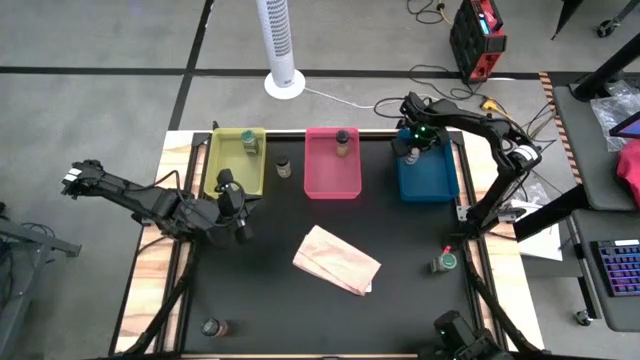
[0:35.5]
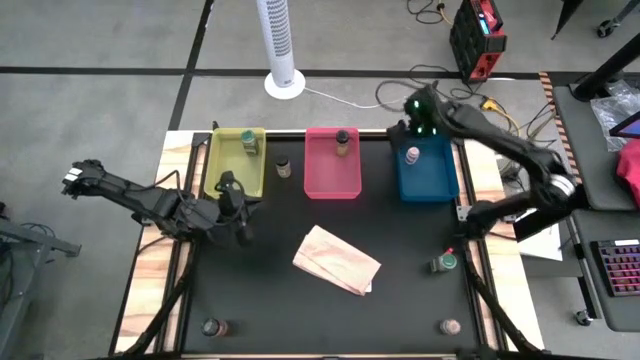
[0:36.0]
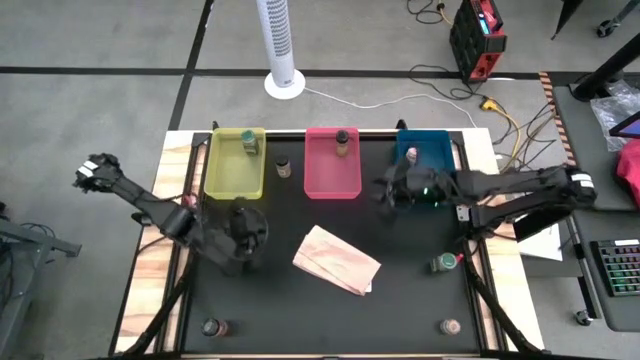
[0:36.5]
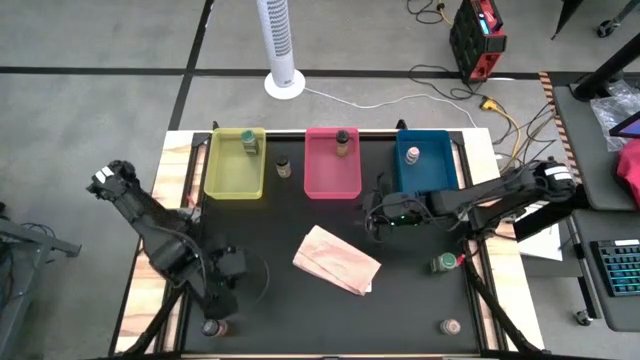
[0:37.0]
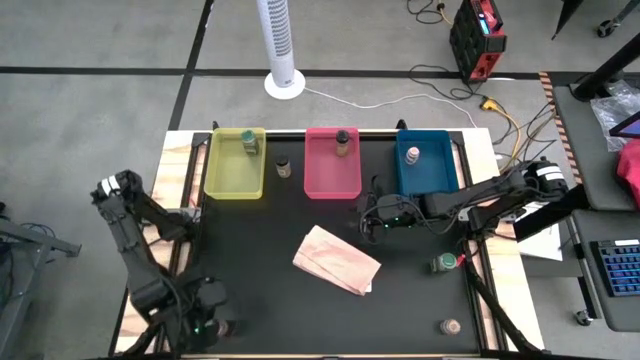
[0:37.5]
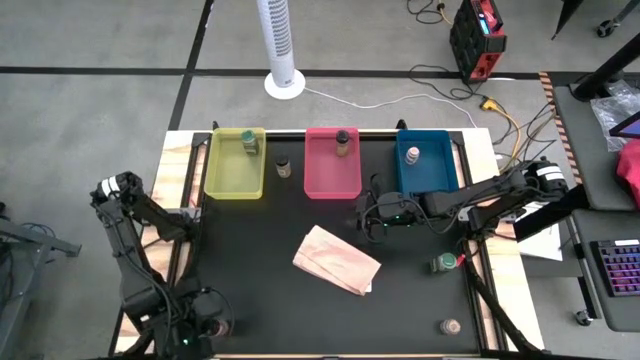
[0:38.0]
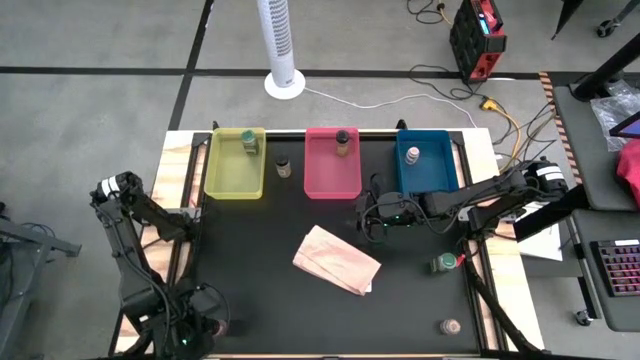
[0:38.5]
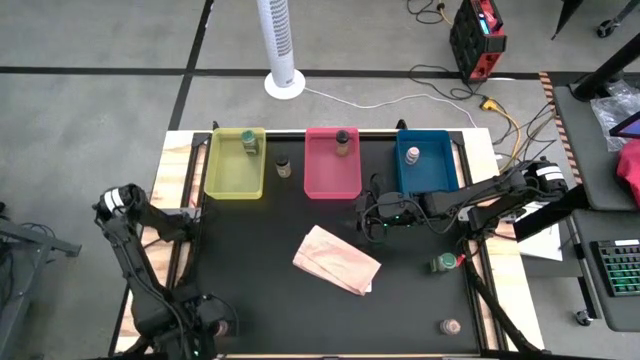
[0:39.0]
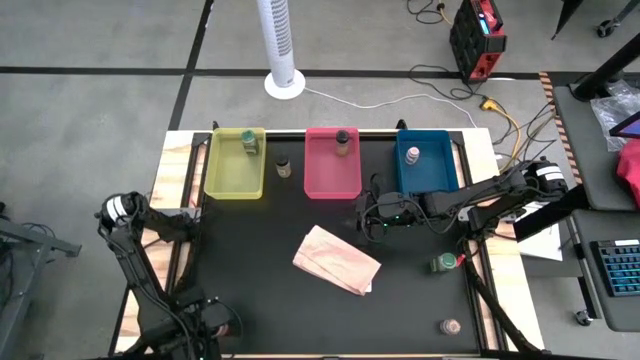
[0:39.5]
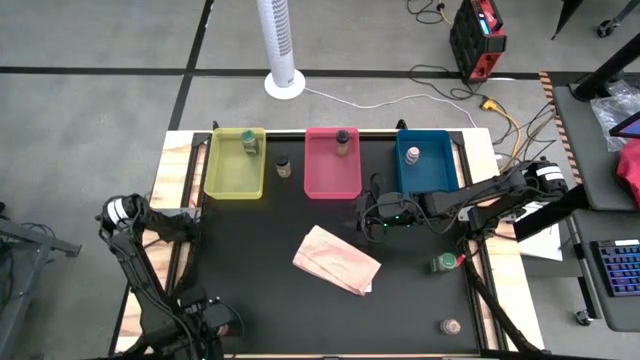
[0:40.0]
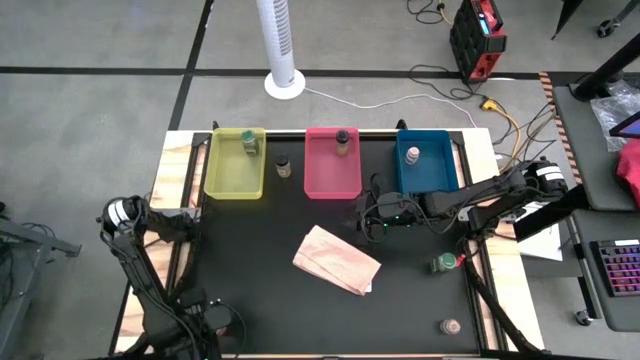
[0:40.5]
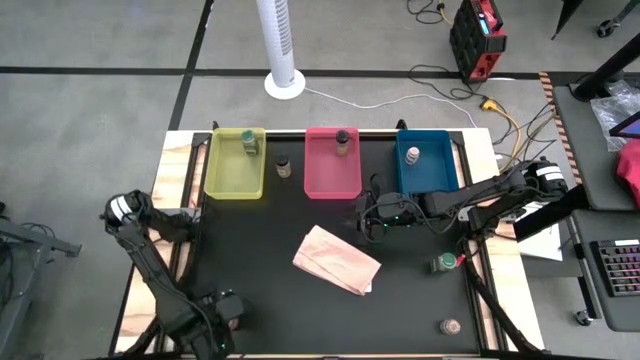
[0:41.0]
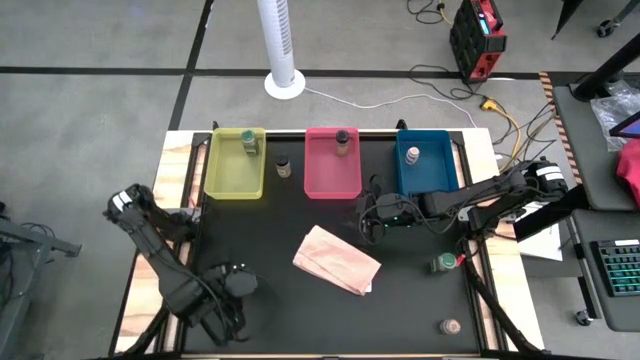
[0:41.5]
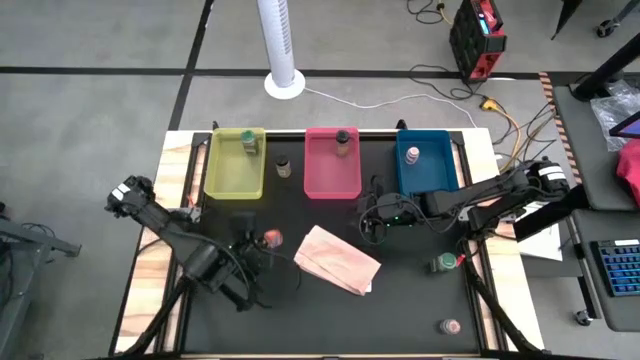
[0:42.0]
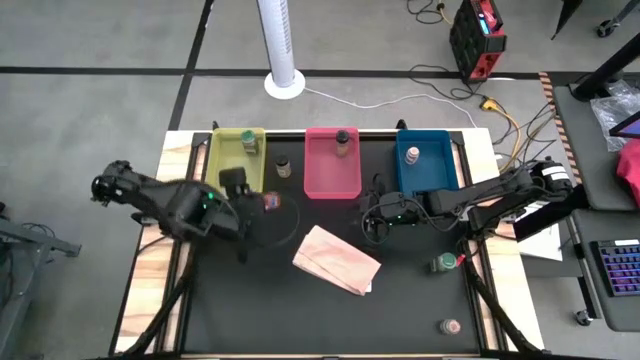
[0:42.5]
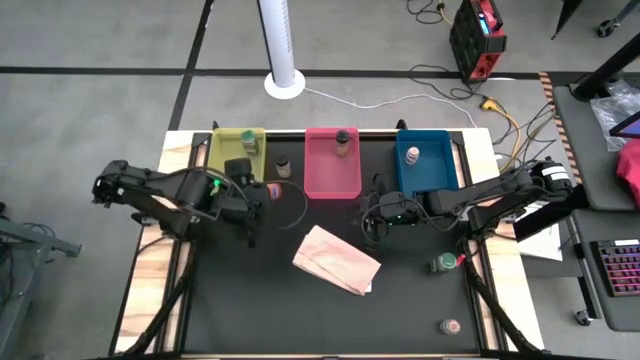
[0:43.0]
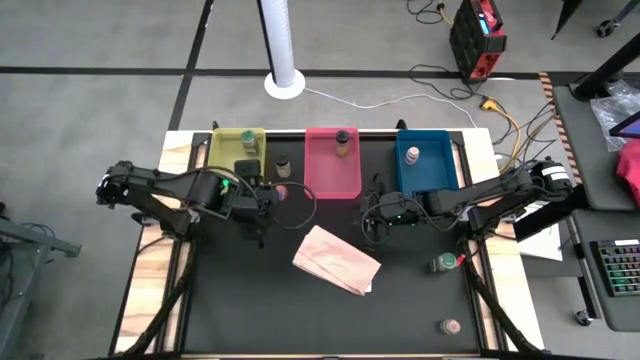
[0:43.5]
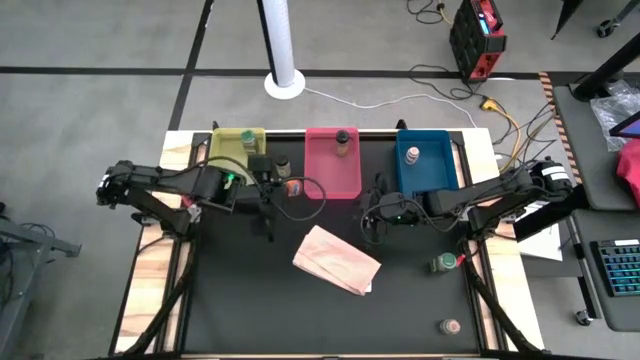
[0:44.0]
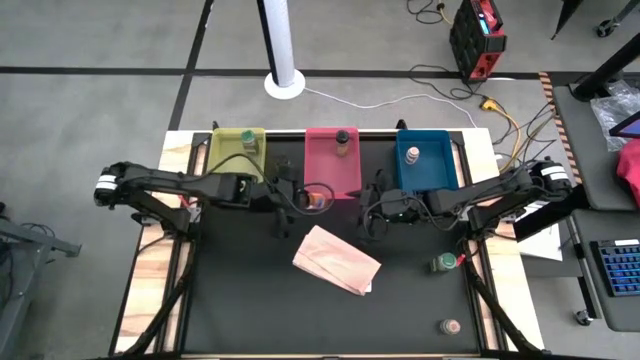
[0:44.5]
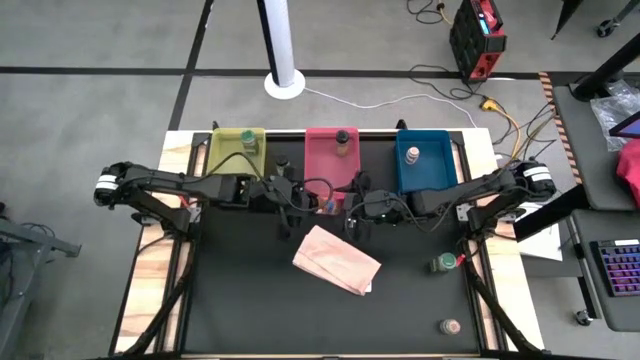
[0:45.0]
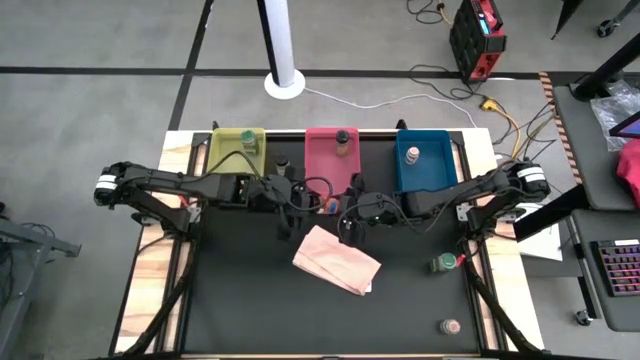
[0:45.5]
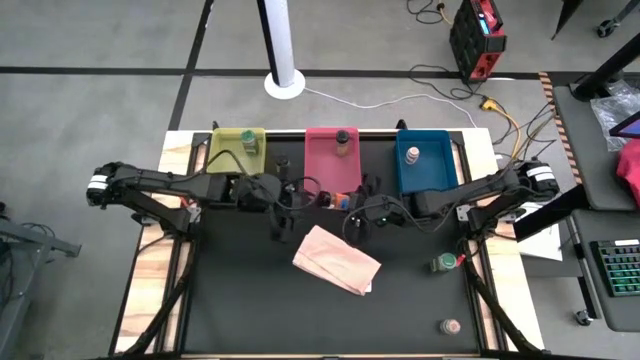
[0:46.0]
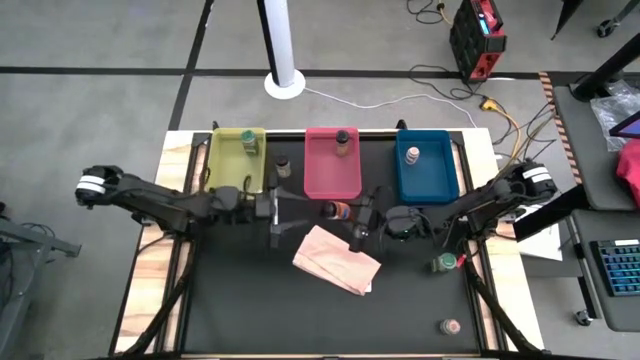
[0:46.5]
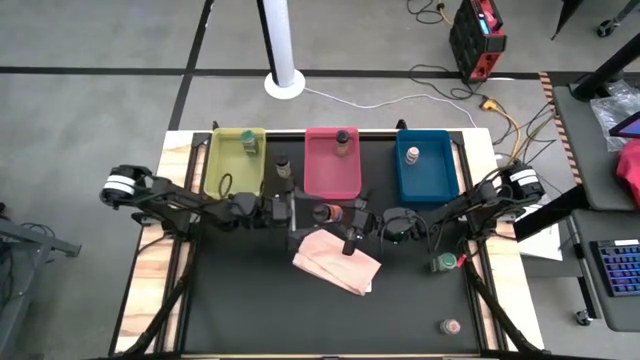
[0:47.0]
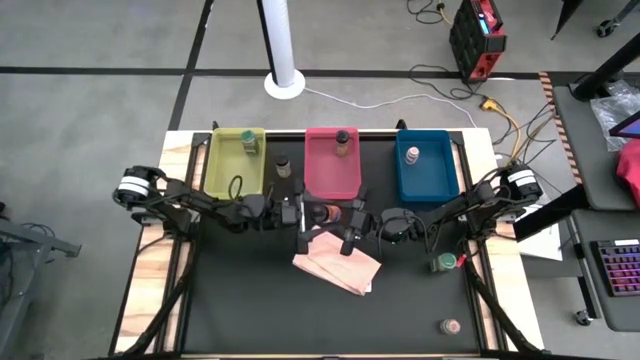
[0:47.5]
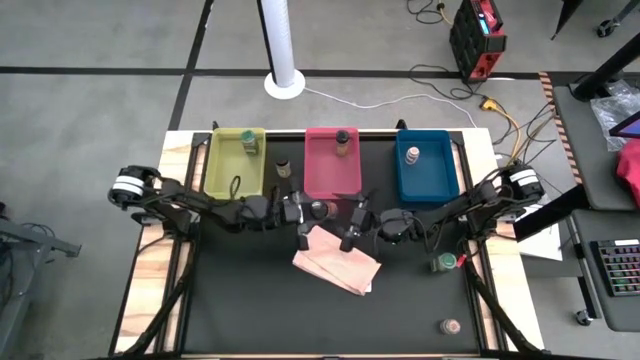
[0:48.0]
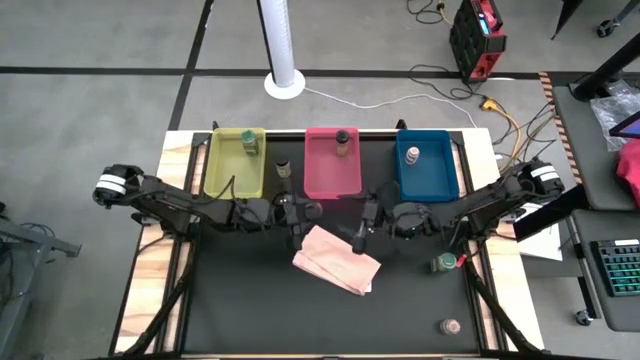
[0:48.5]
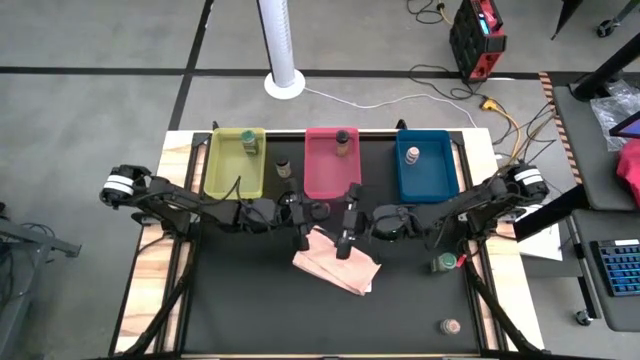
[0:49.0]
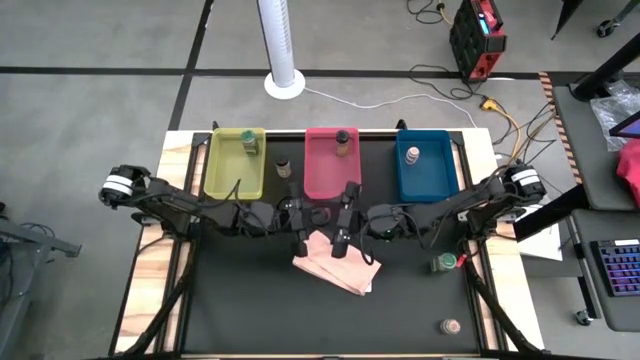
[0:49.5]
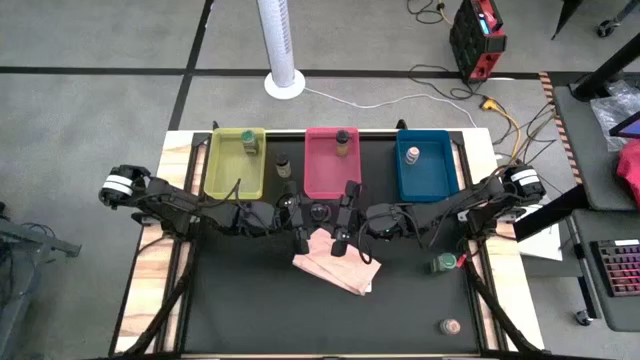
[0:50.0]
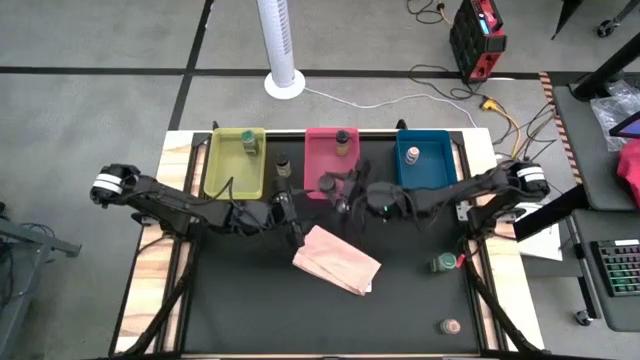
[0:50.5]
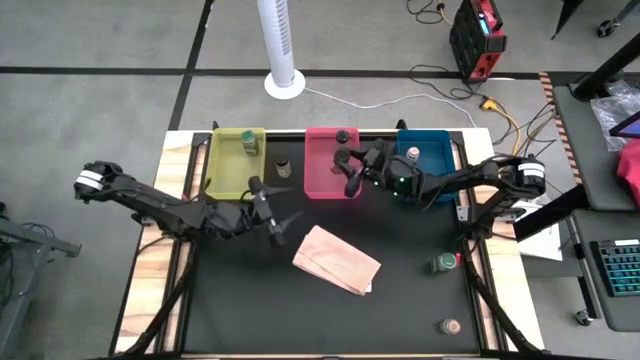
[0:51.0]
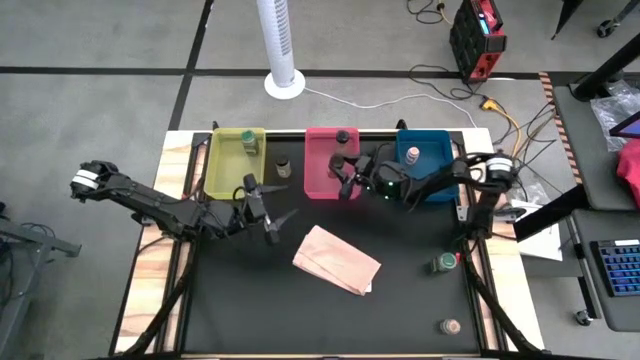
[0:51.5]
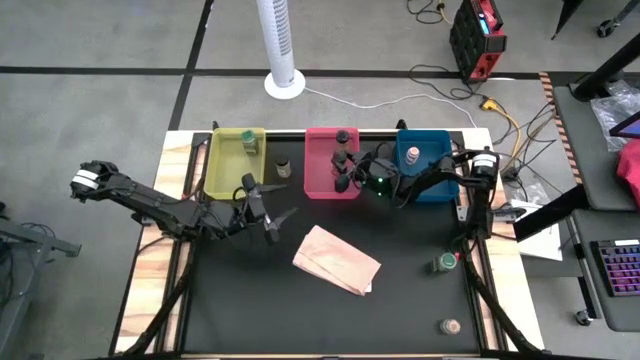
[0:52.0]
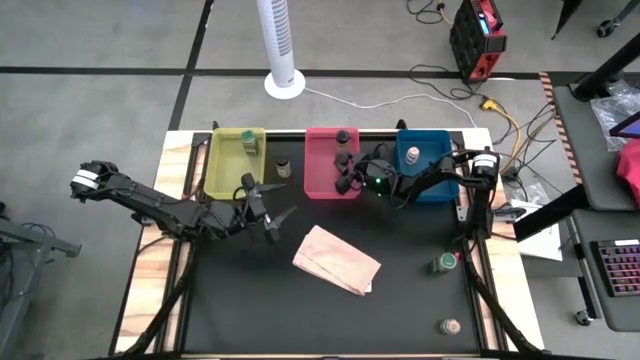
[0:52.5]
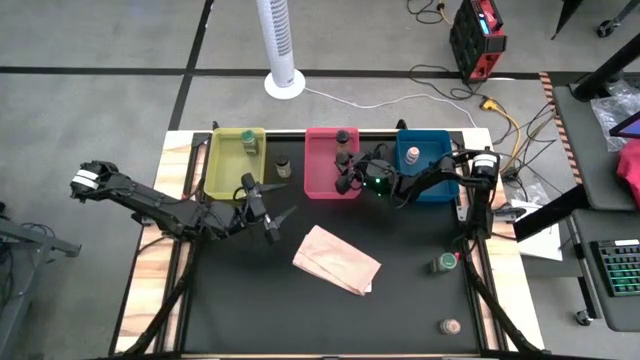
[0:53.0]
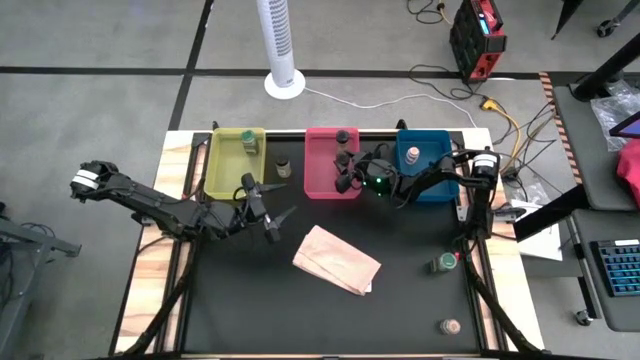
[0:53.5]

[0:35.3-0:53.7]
Task: Sort spices by type
Put the bottom black seasoning bottle into the pink bin

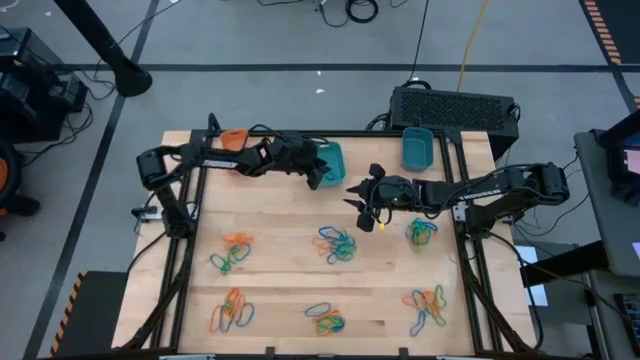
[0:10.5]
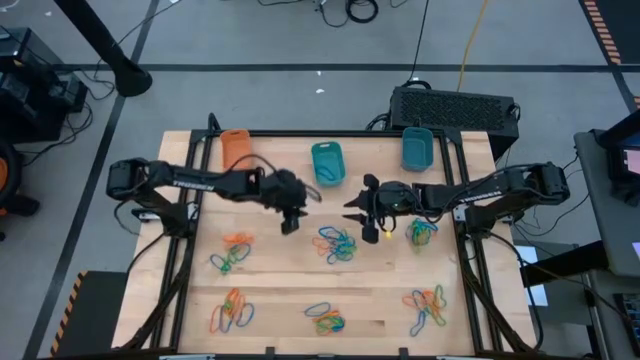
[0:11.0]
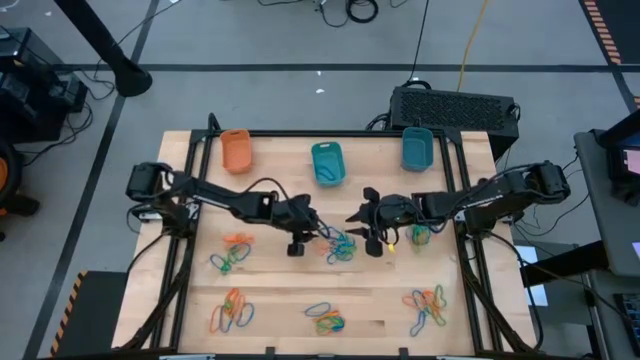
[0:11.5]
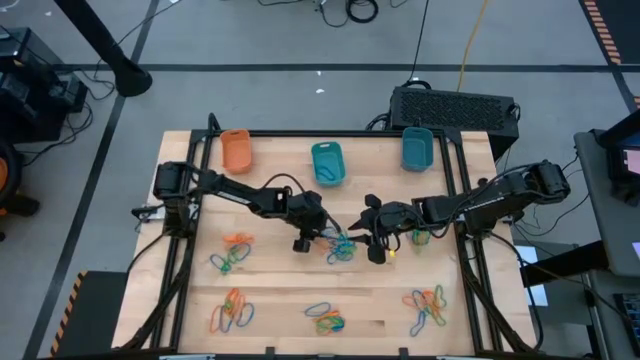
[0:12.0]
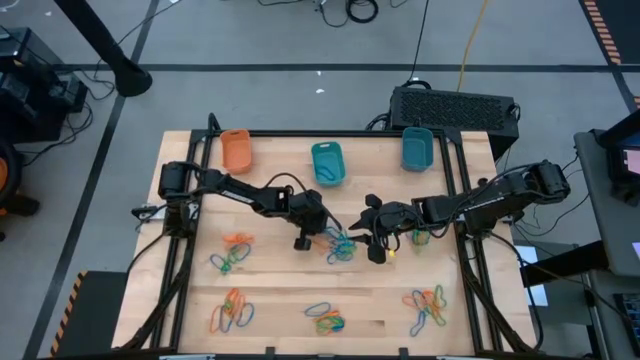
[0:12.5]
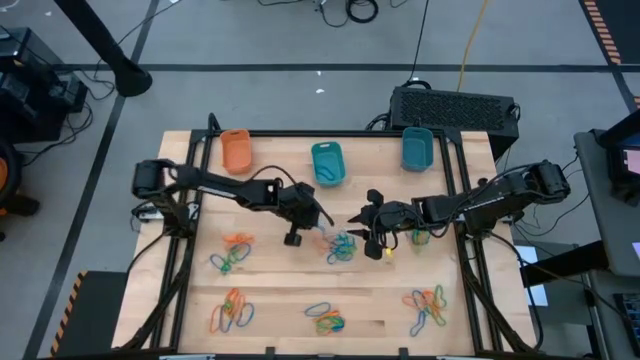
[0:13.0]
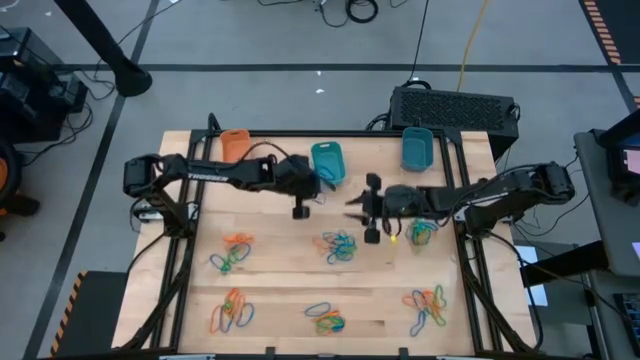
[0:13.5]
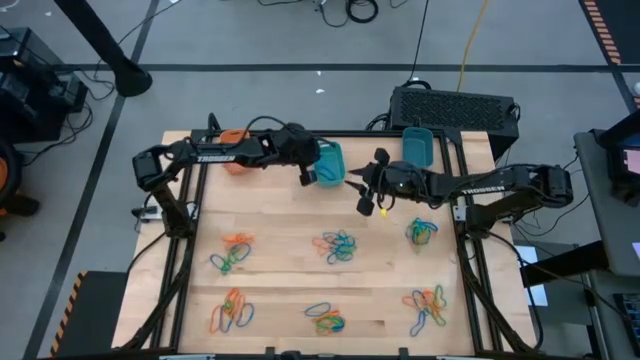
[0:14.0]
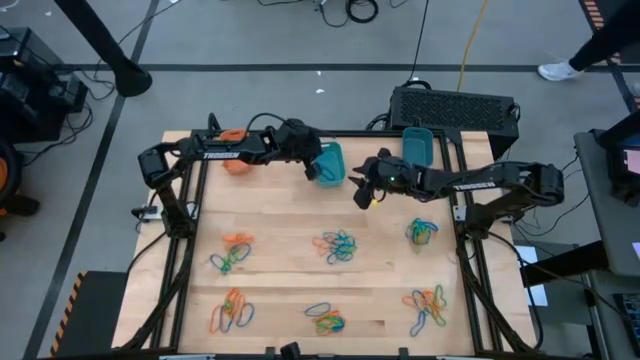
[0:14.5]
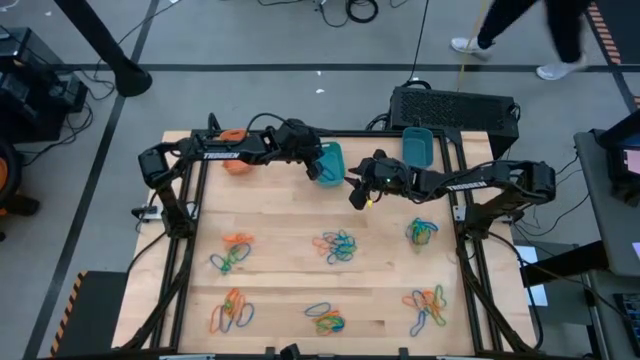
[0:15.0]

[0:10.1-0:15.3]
Task: Sort rubber bands into baskets
Put the blue rubber band into the light blue bin
